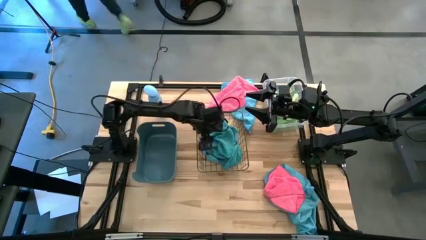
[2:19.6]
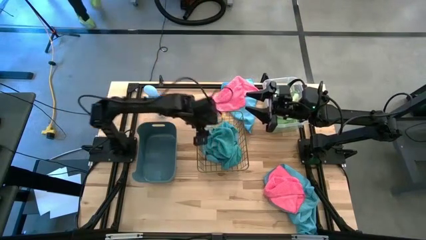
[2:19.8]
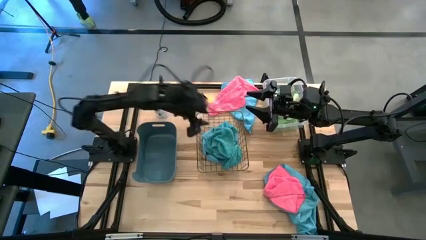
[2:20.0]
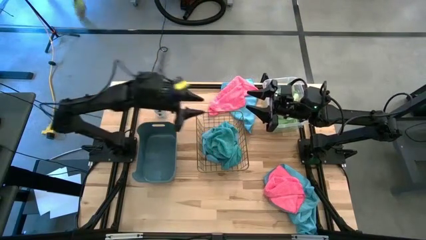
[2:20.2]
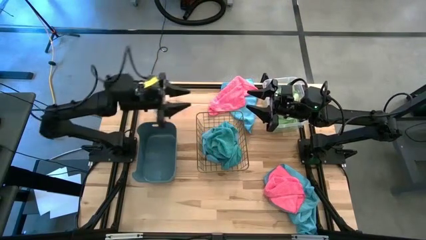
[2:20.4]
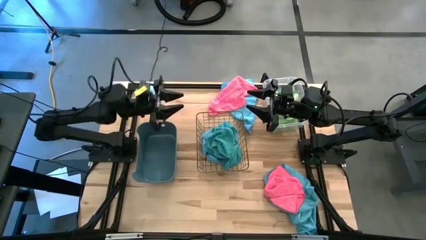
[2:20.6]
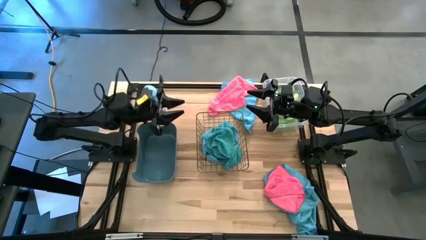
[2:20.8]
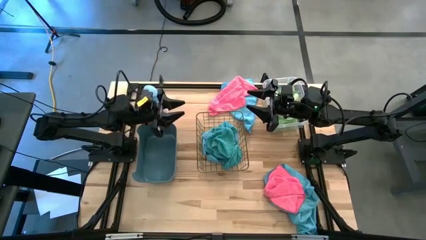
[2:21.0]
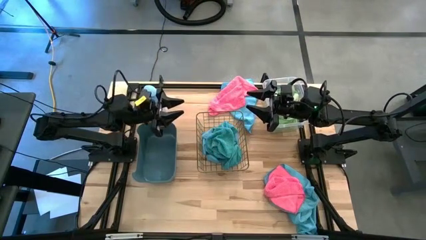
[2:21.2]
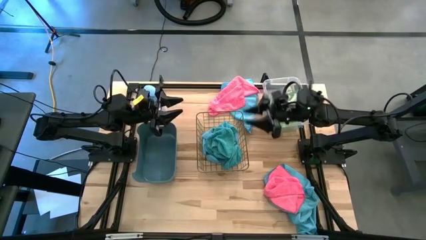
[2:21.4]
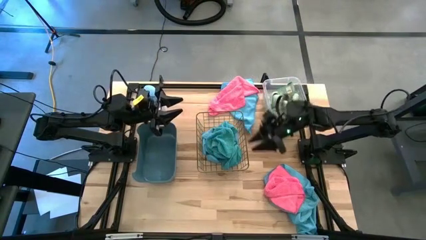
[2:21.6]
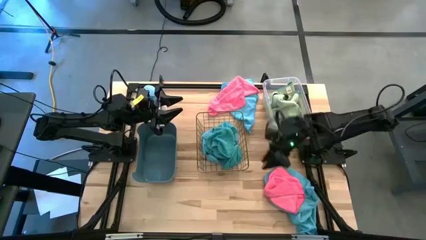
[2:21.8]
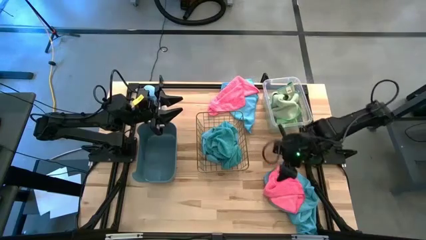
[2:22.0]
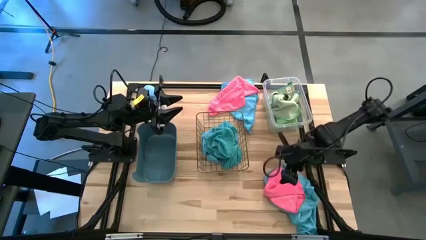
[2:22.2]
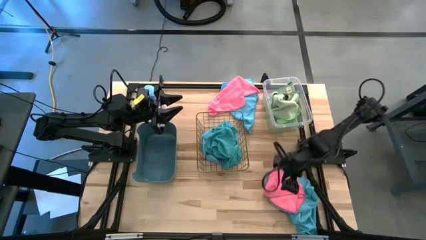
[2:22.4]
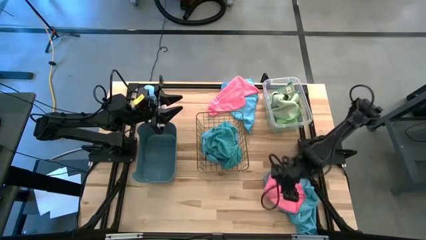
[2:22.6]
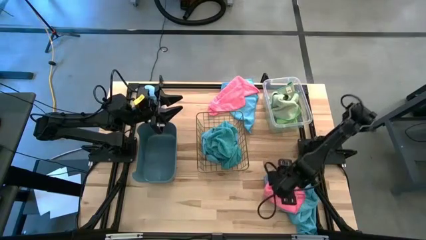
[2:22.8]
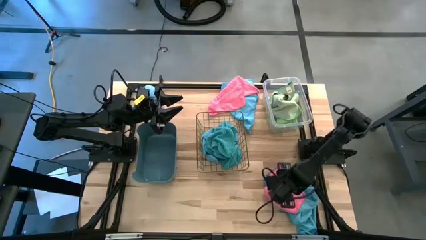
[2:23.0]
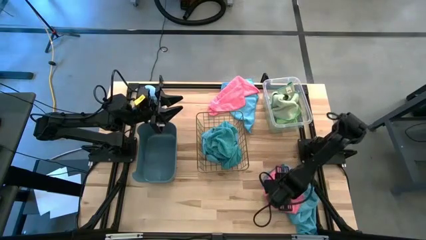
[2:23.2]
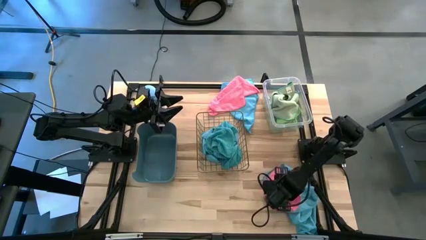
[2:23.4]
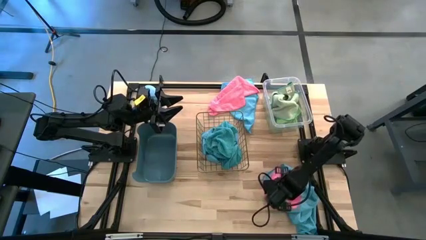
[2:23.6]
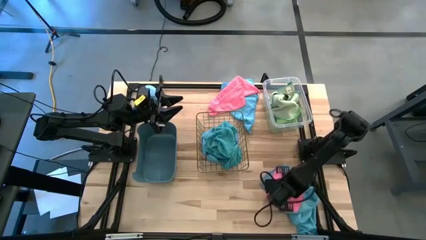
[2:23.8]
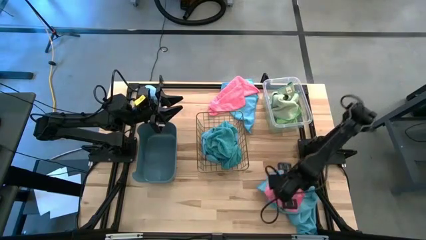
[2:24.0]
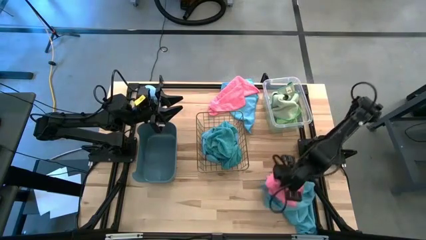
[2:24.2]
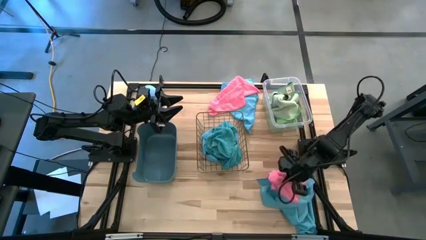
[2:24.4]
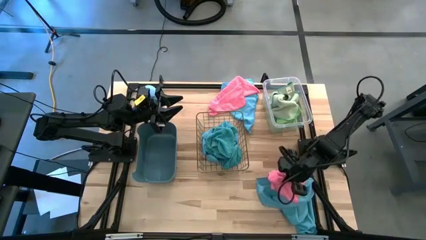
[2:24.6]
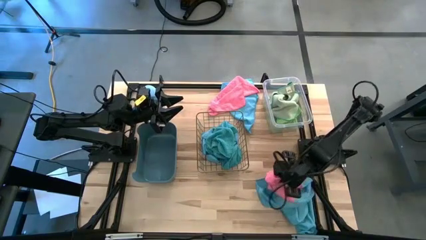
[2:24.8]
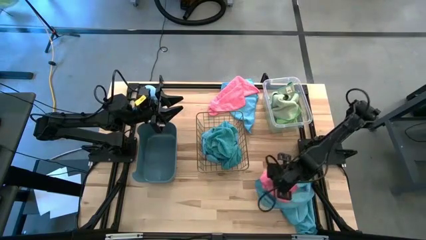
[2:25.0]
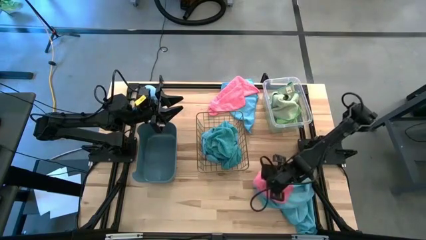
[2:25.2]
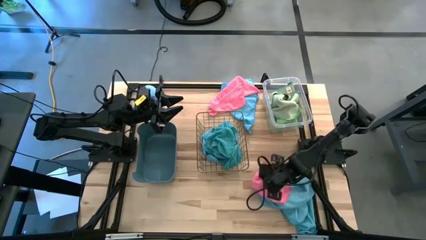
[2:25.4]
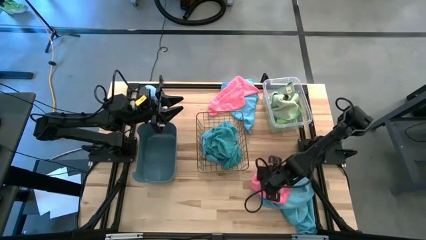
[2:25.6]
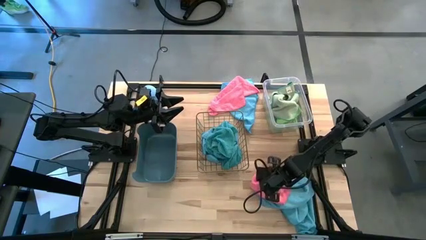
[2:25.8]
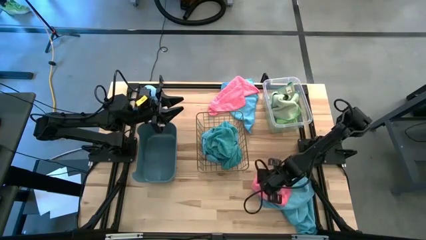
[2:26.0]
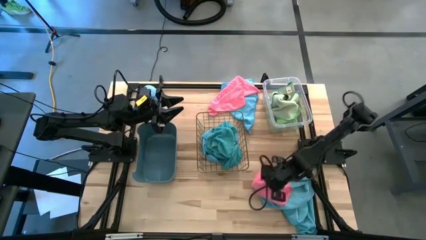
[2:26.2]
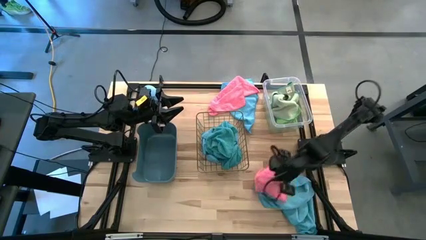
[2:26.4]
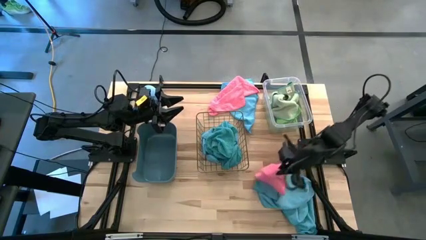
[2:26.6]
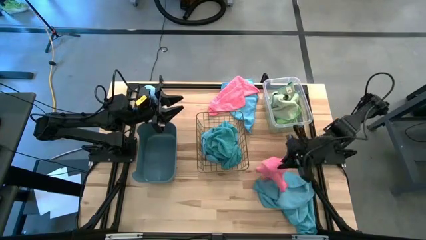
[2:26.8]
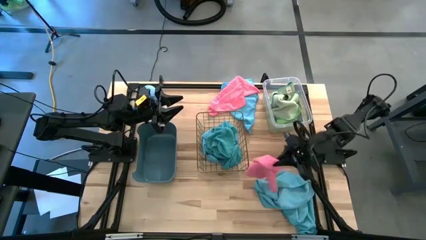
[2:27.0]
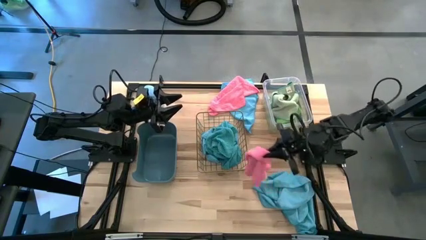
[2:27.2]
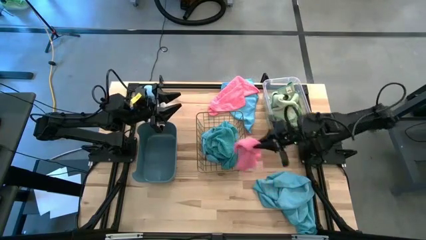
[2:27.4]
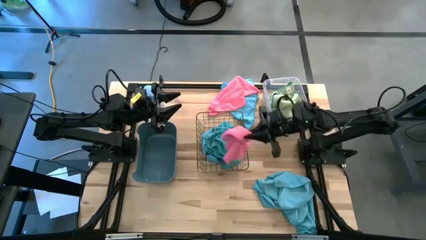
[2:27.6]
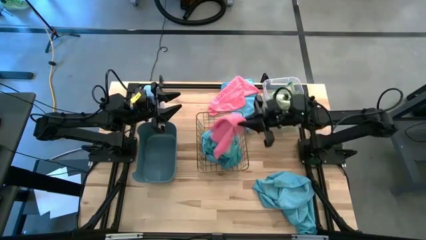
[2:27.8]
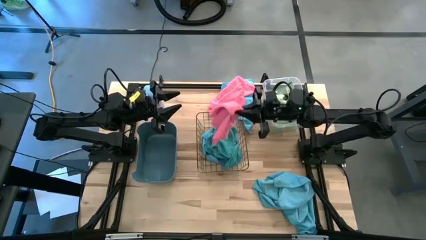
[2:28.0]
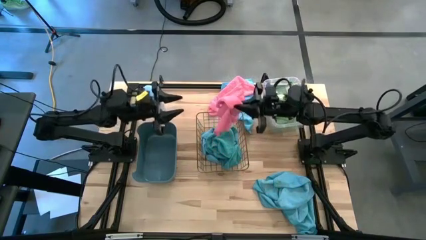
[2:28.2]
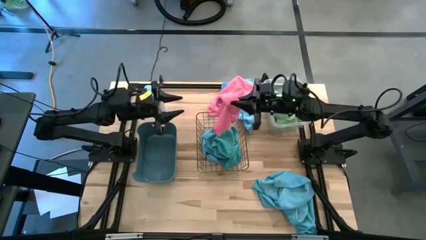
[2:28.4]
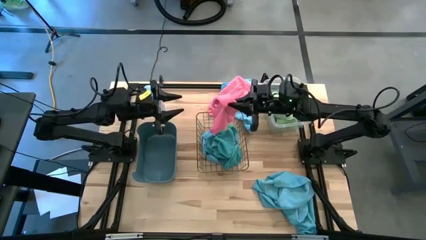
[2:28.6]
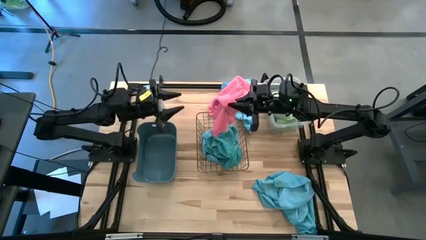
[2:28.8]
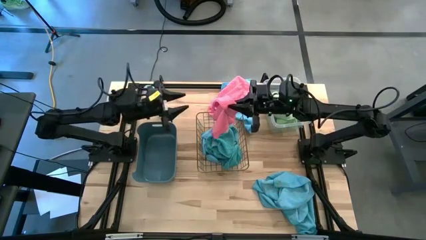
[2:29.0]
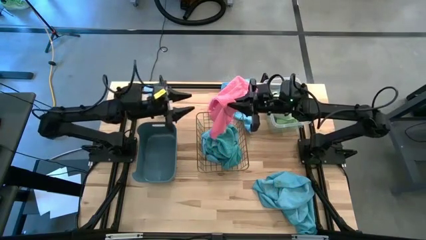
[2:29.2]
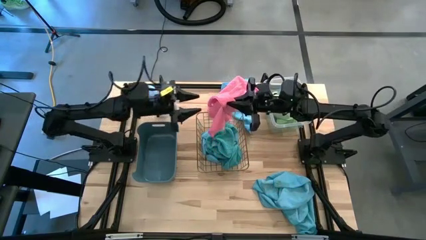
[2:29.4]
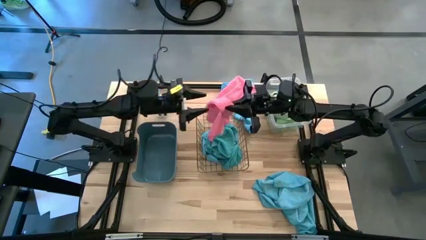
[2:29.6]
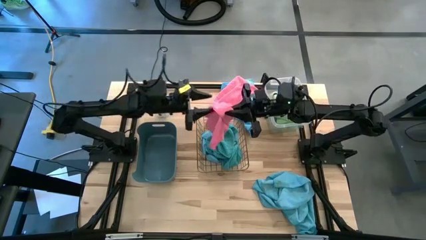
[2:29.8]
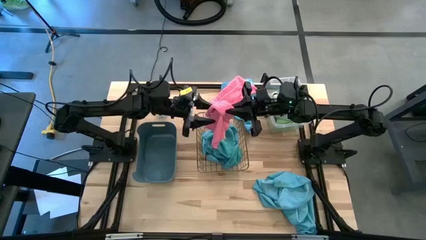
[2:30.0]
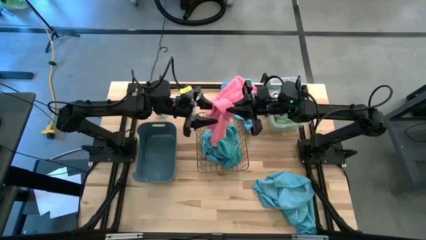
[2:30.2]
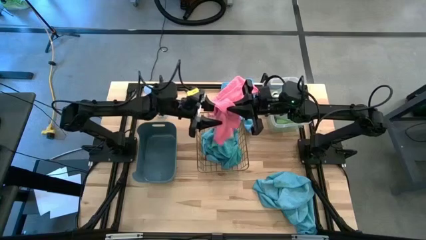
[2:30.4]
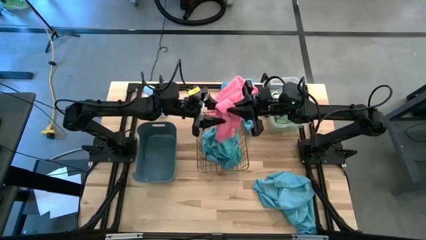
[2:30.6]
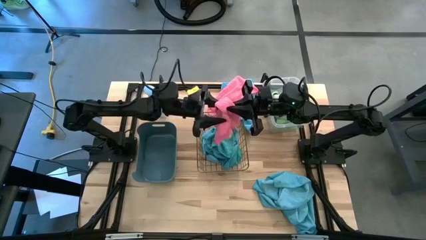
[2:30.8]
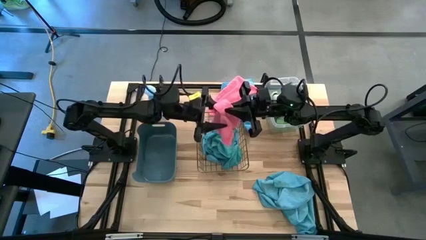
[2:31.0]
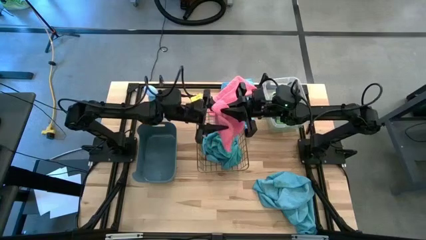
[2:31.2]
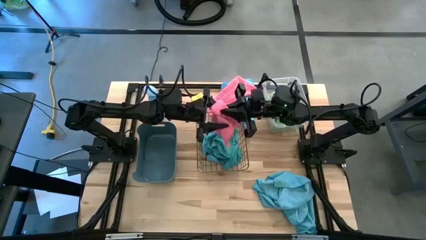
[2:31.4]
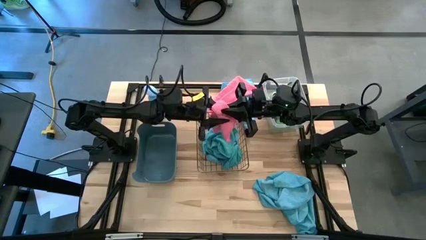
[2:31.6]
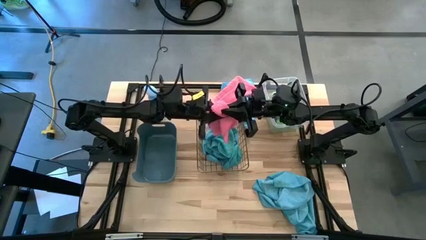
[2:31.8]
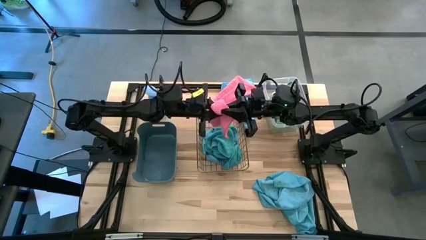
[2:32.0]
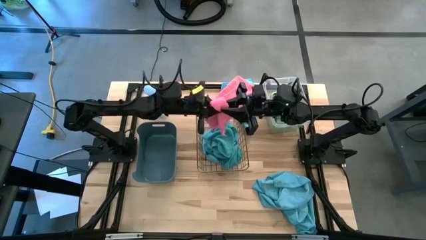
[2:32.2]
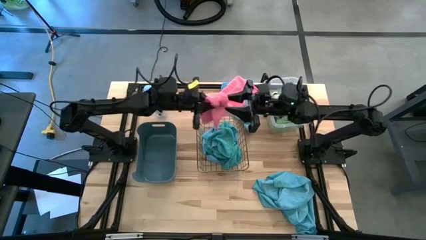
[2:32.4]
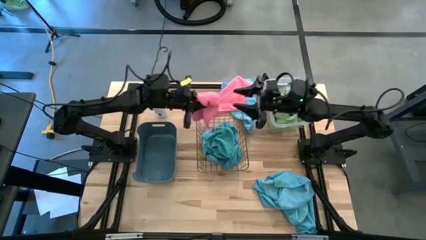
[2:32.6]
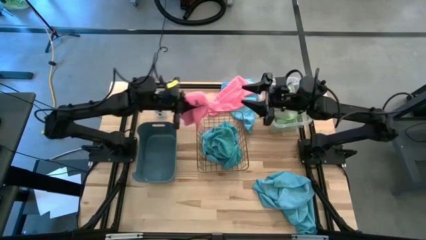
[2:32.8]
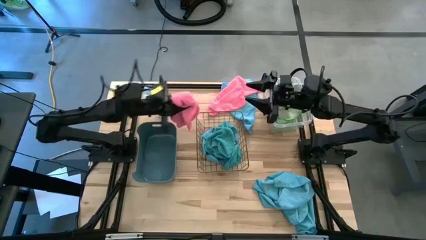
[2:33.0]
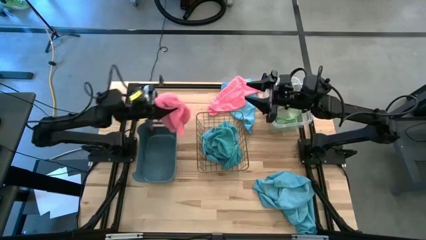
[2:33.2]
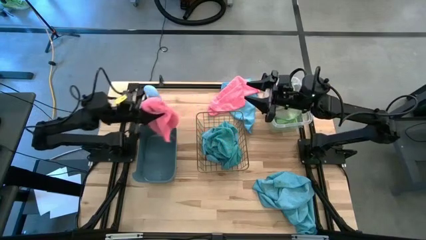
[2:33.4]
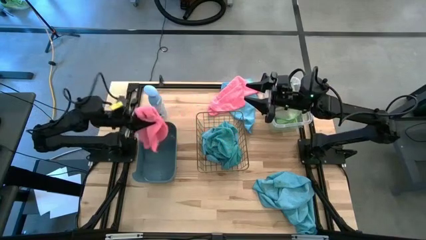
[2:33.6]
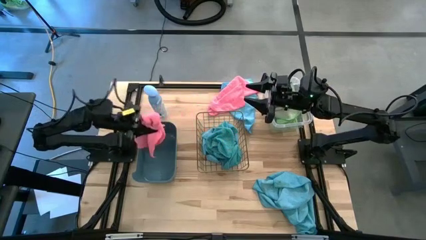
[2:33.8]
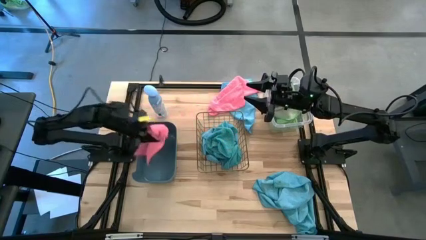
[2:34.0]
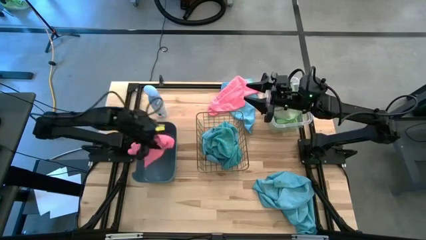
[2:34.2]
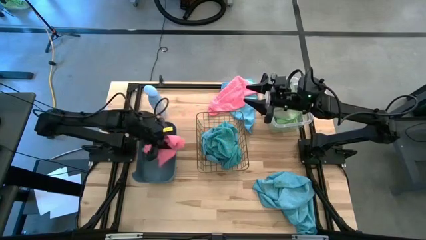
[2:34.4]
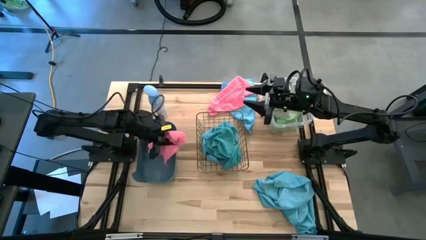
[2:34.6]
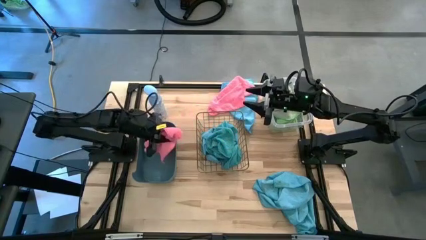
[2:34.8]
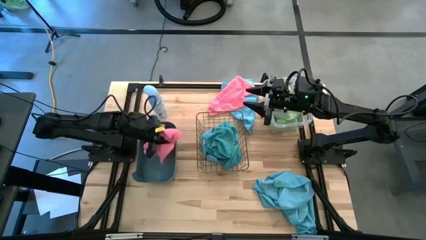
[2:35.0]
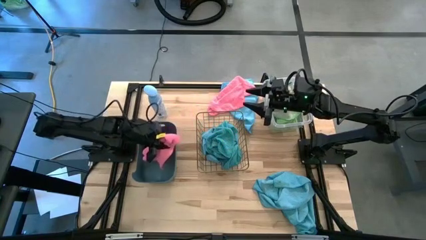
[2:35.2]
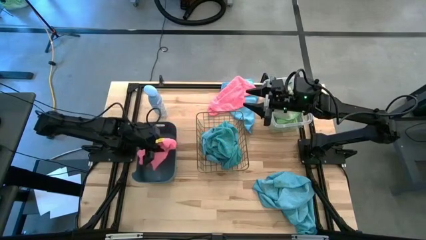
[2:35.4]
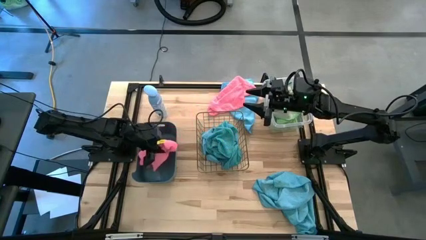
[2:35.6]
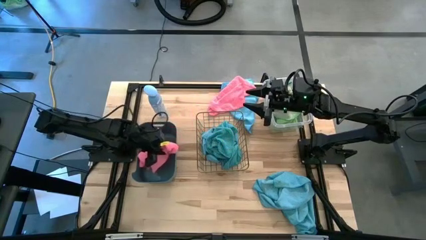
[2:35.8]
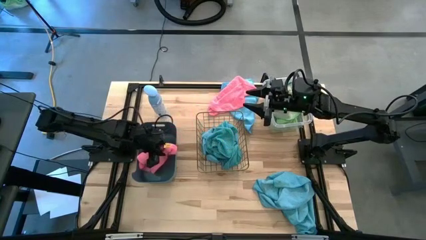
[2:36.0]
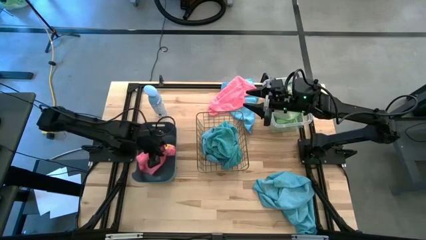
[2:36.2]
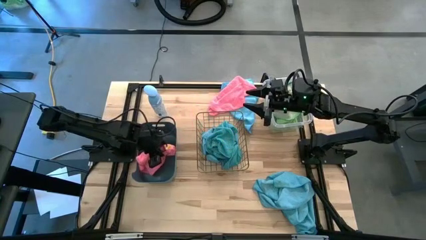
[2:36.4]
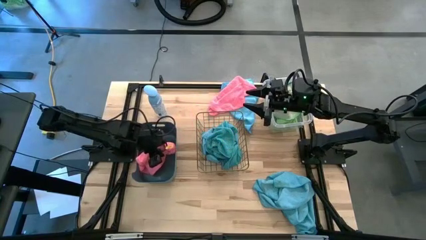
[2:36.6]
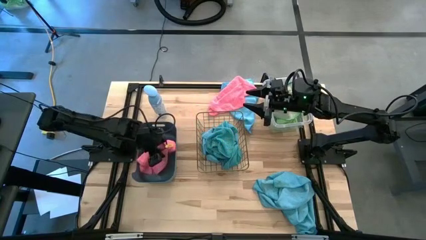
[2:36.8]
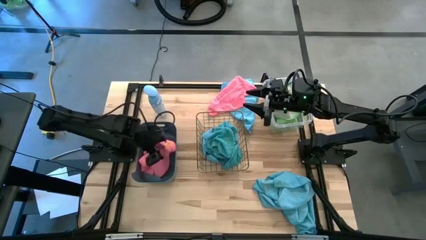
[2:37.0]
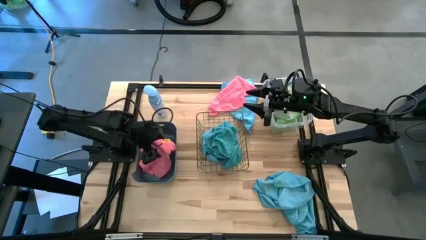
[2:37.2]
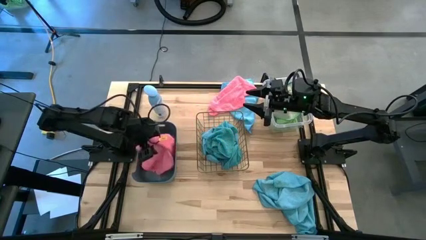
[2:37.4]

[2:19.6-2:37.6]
Task: Sort microfiber towel by color & place in baskets
Put the bottom pink towel into the blue bin
